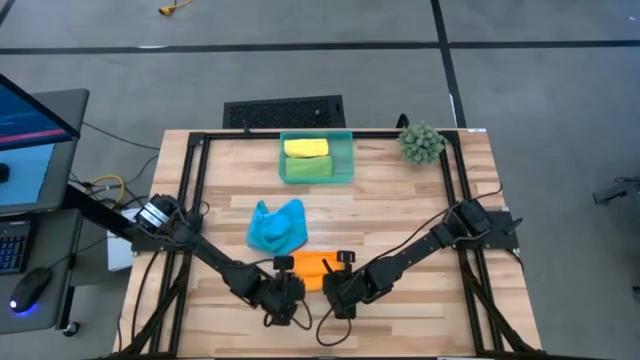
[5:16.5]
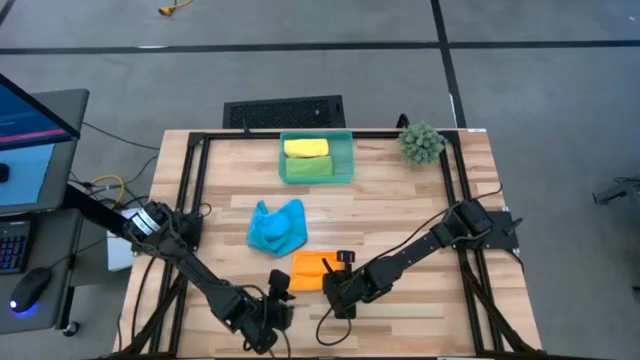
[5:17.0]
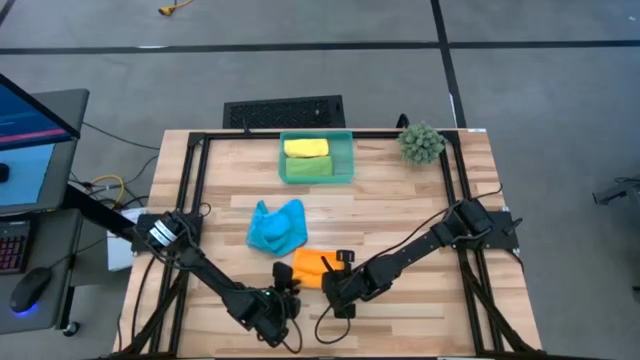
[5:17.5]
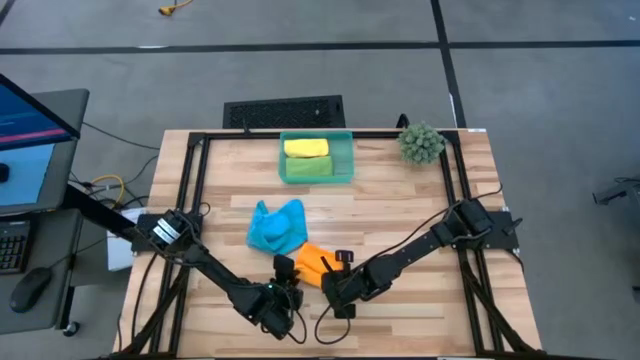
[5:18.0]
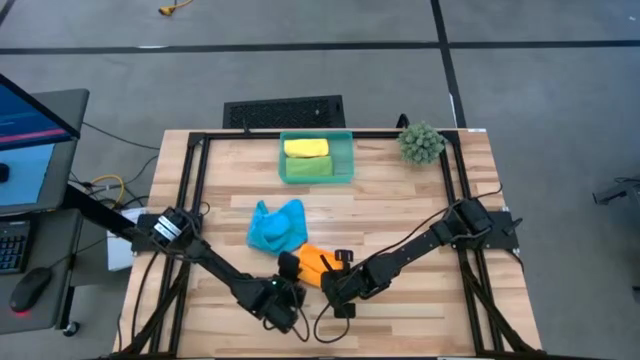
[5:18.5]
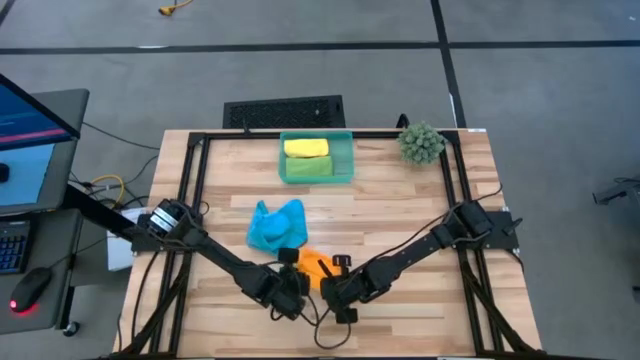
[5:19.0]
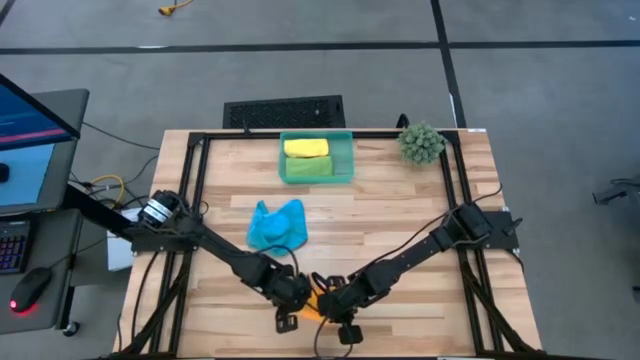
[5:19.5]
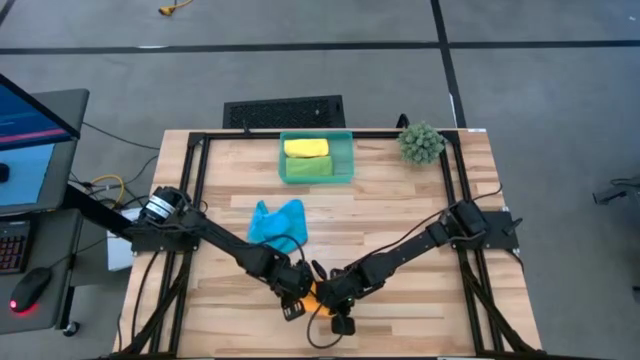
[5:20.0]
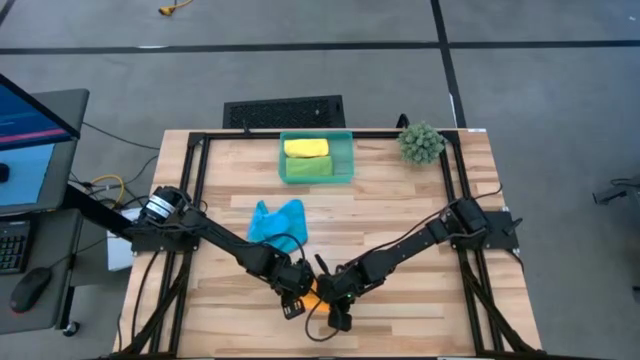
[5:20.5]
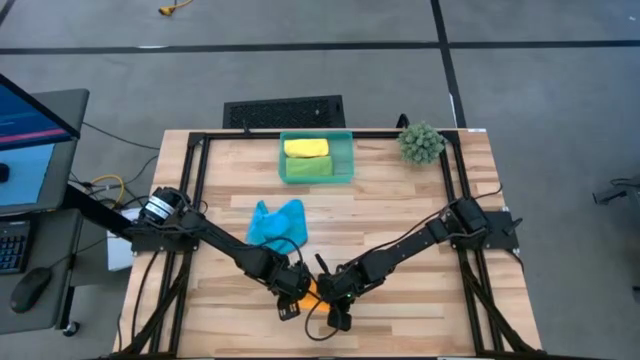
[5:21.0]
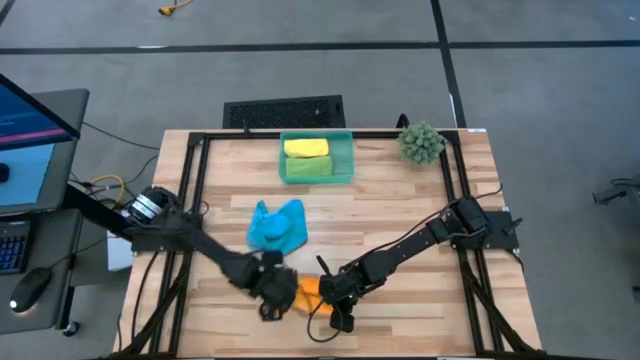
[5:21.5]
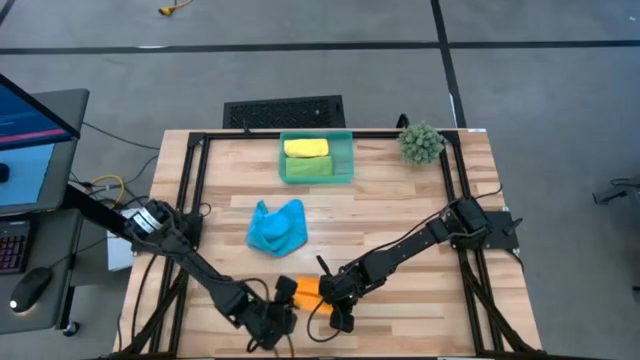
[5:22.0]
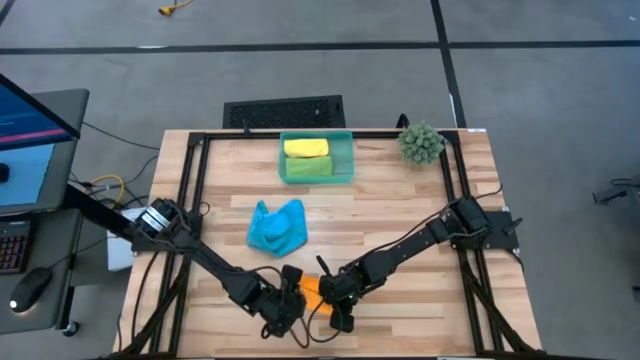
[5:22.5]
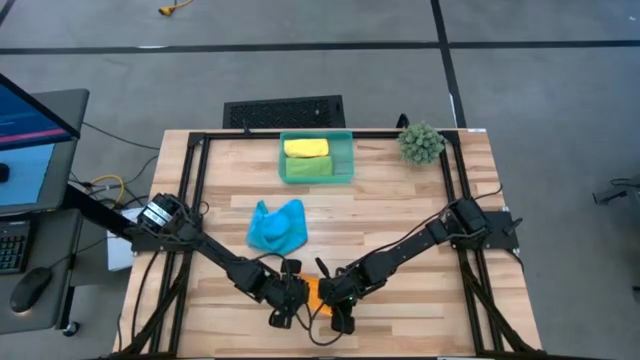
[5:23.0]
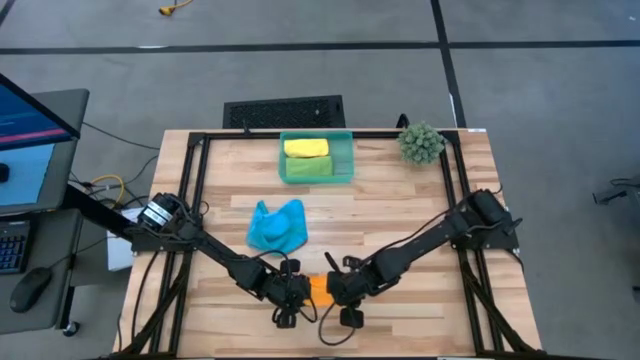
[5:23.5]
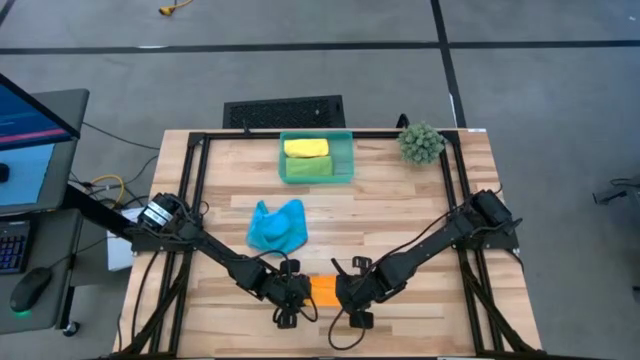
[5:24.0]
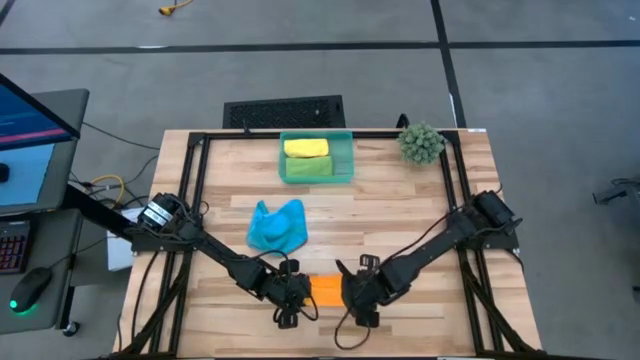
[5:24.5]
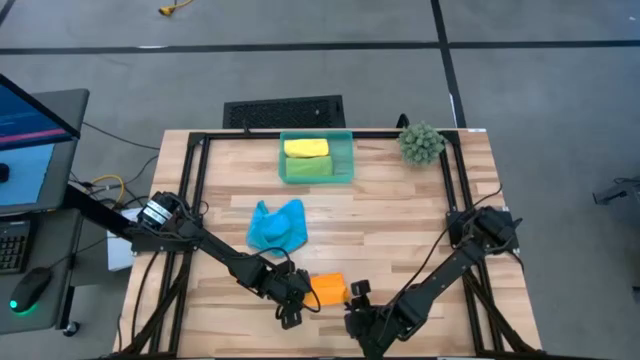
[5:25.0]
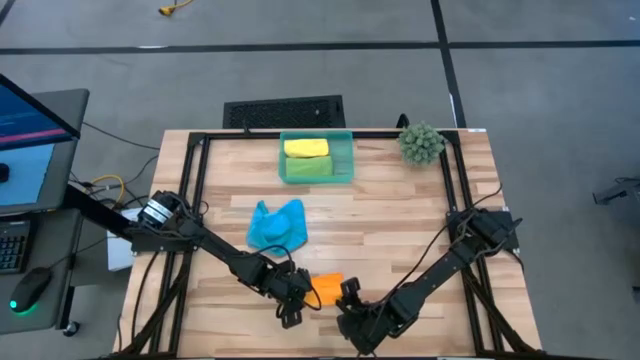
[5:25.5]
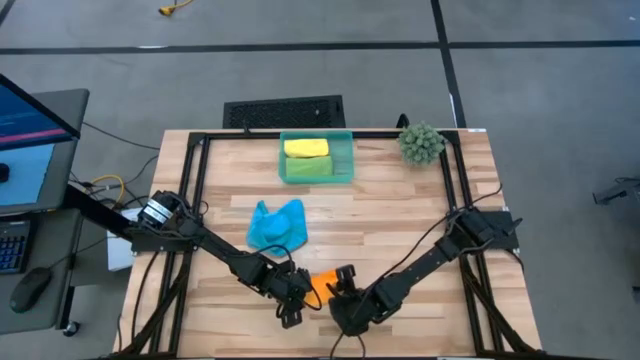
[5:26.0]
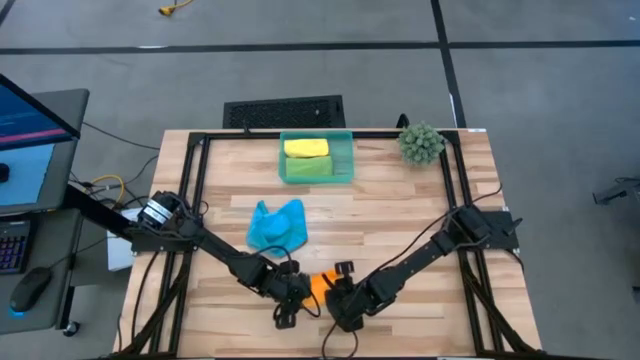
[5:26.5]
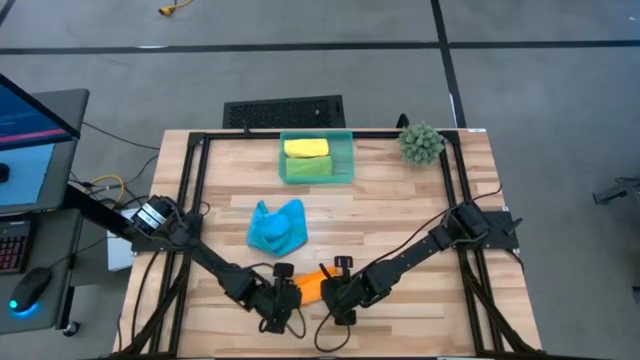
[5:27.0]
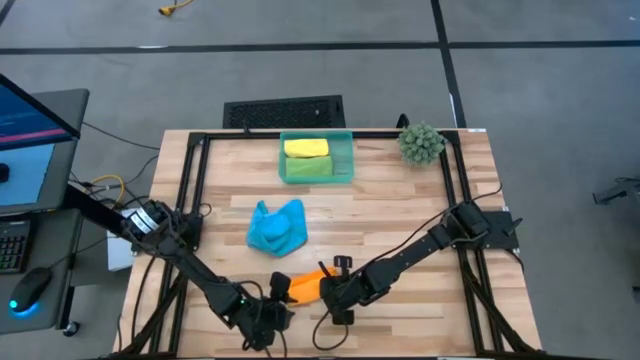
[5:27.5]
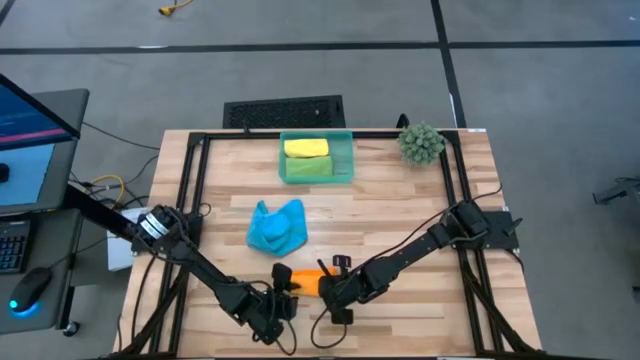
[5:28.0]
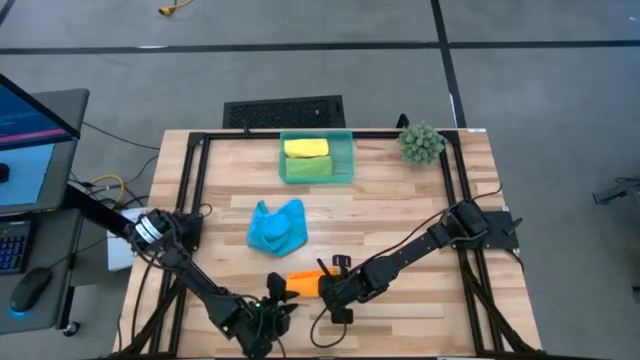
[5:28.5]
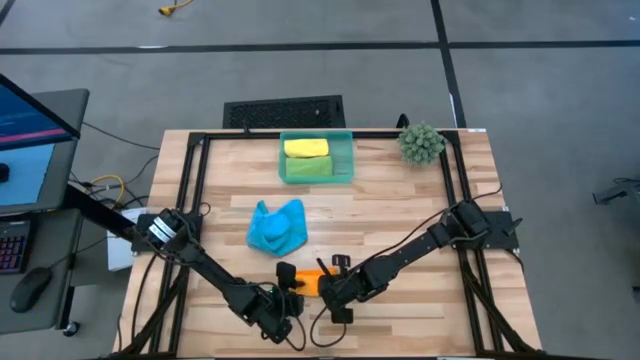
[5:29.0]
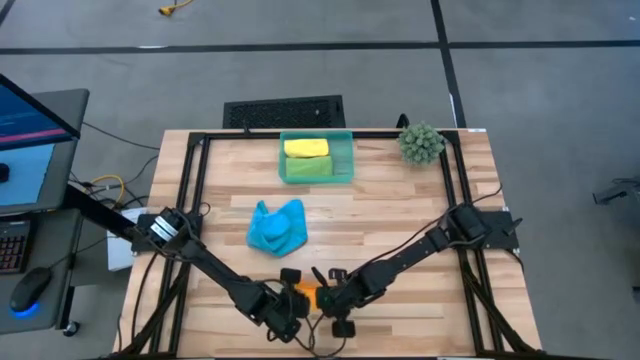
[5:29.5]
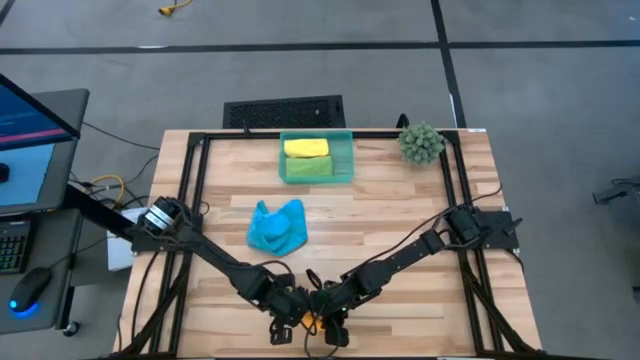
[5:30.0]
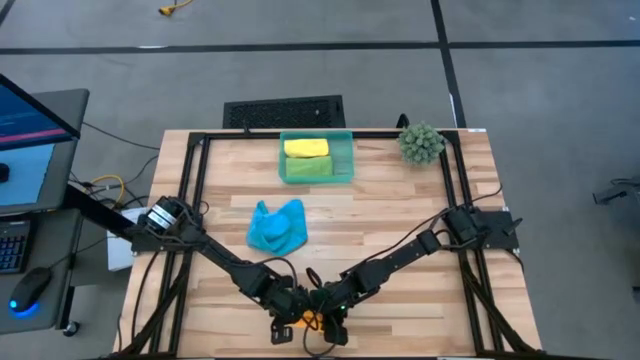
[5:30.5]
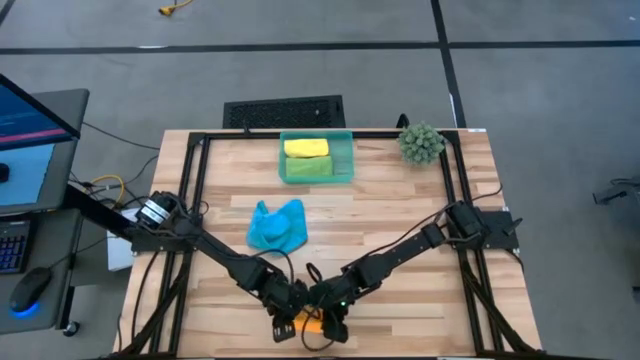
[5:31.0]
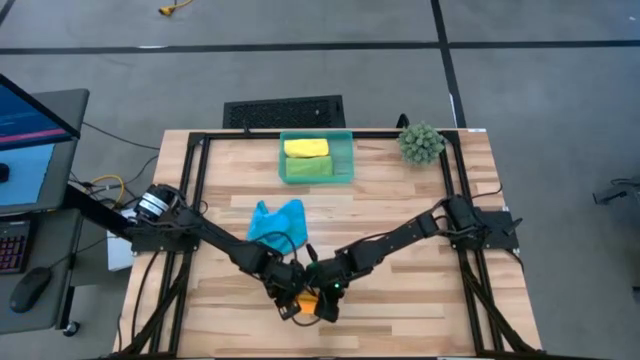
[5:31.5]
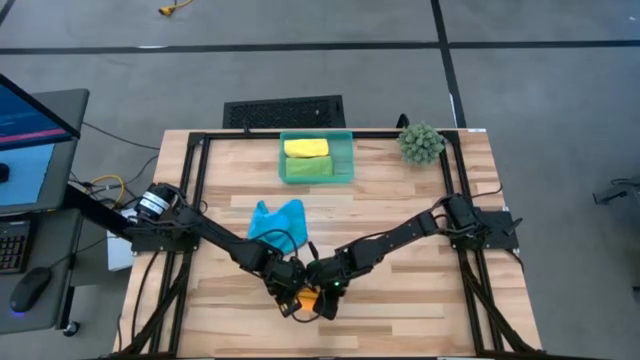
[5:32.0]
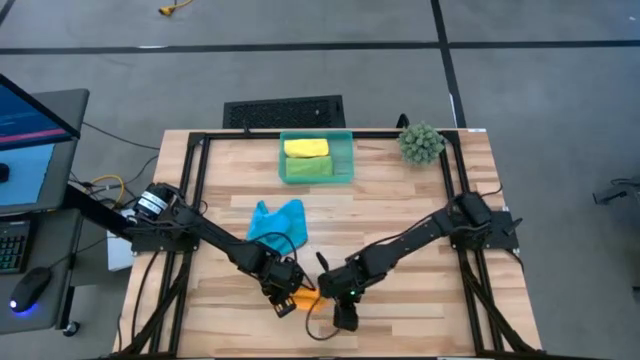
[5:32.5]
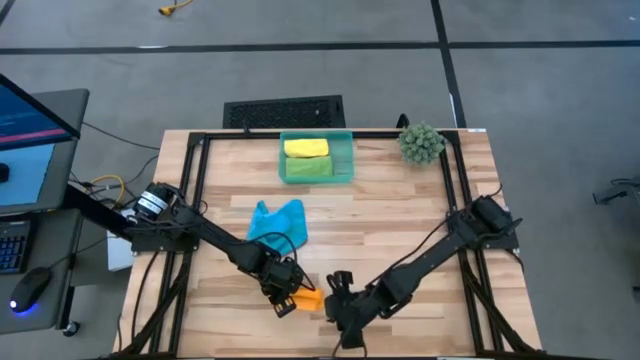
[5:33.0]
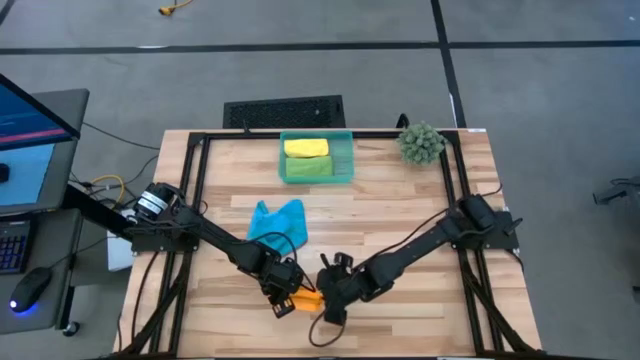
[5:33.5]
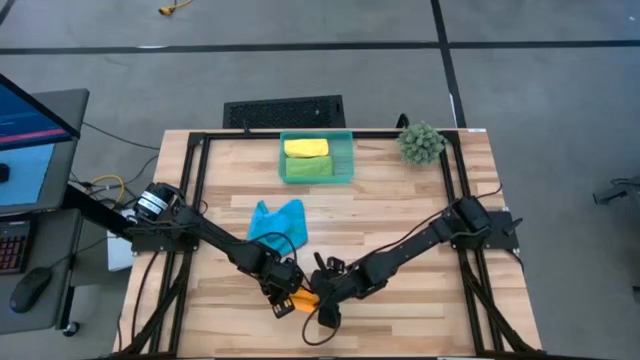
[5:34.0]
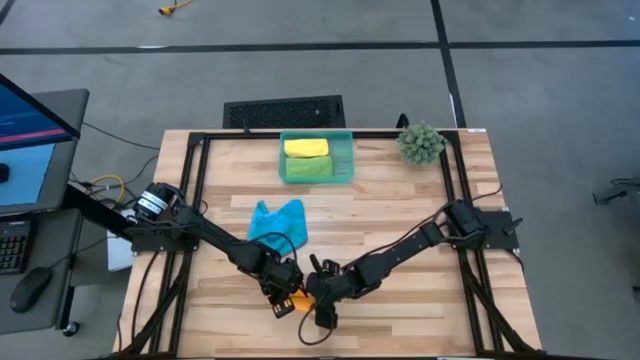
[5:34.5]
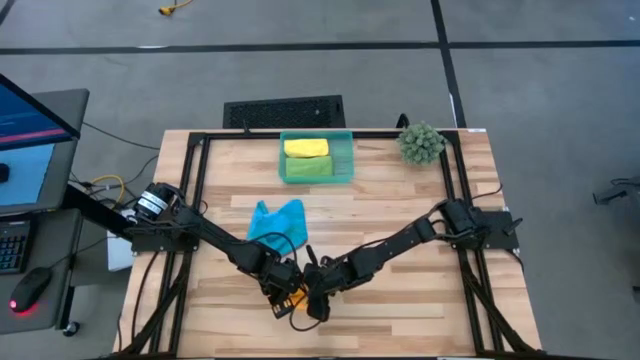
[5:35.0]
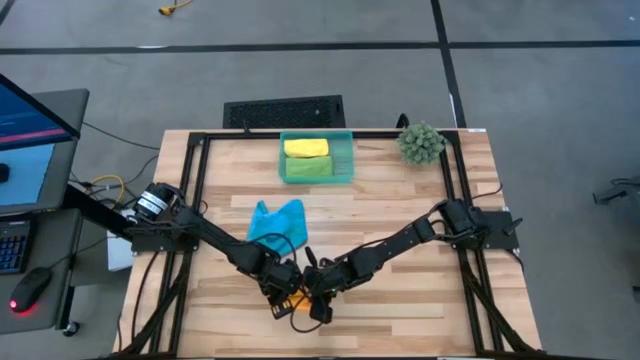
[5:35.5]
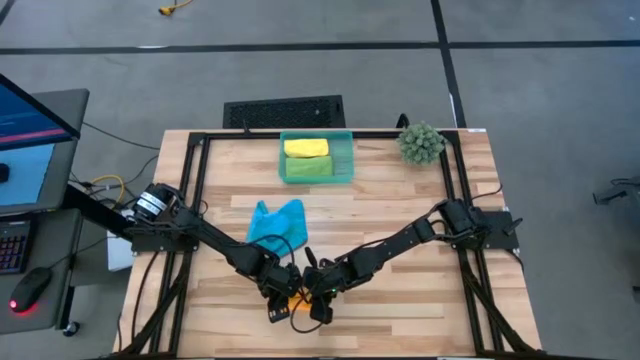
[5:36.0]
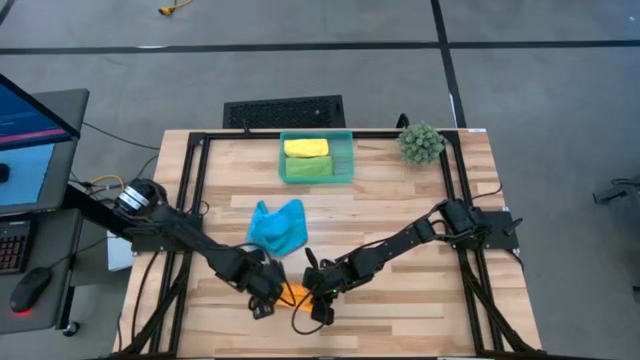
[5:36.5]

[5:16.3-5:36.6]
Task: Roll microfiber towels into tight, uniform cylinder then place into a basket
Roll the orange microfiber cloth
